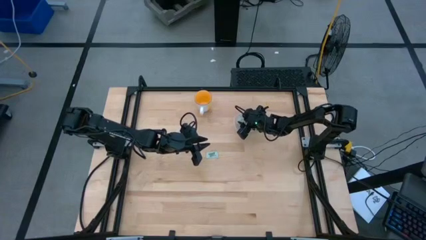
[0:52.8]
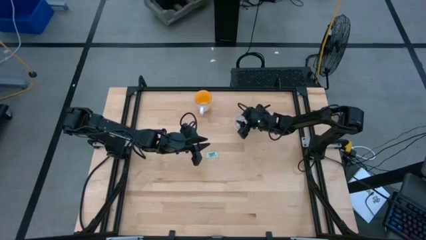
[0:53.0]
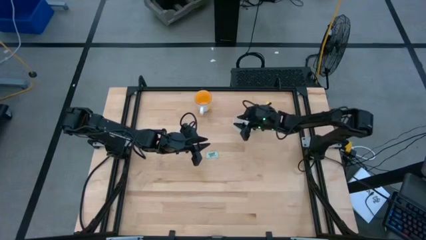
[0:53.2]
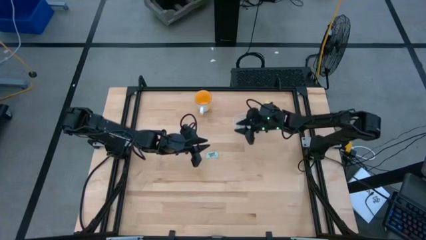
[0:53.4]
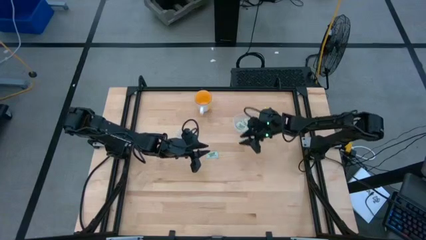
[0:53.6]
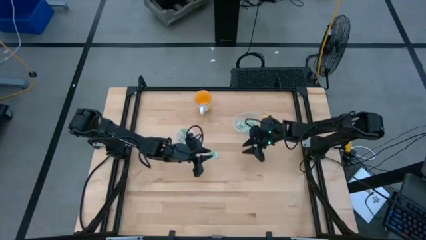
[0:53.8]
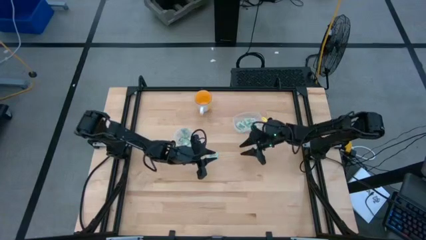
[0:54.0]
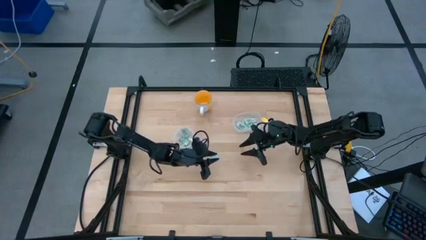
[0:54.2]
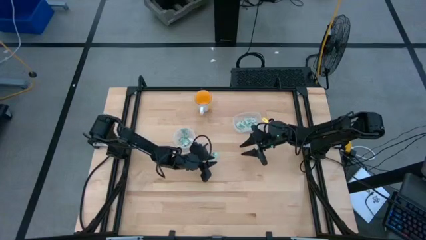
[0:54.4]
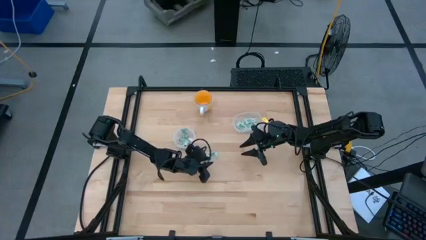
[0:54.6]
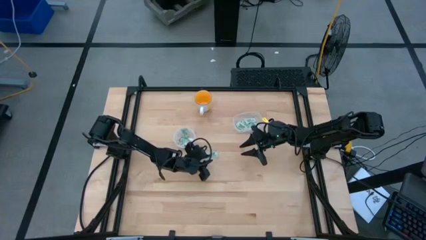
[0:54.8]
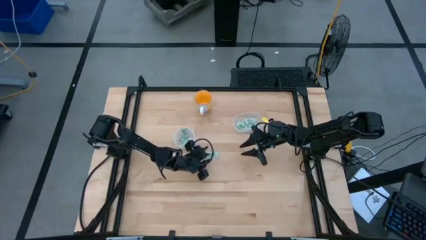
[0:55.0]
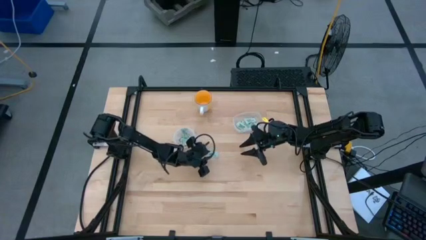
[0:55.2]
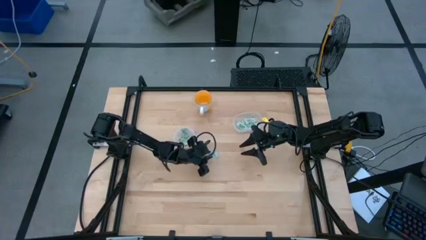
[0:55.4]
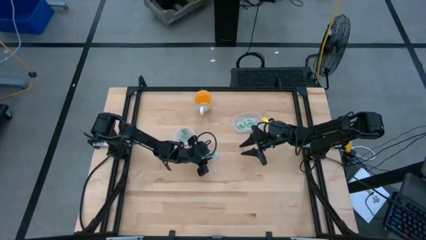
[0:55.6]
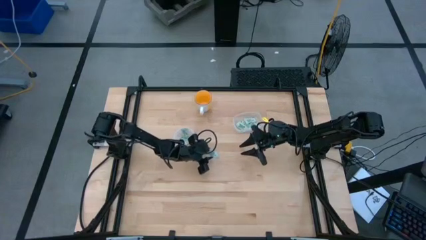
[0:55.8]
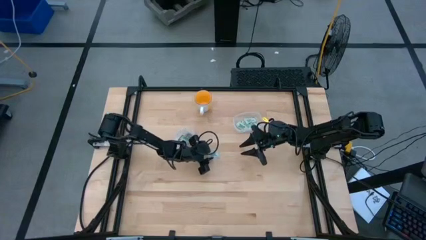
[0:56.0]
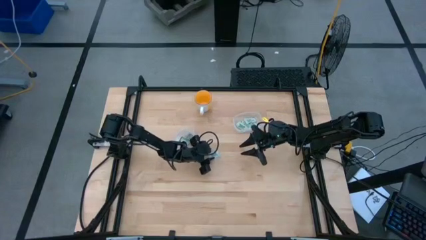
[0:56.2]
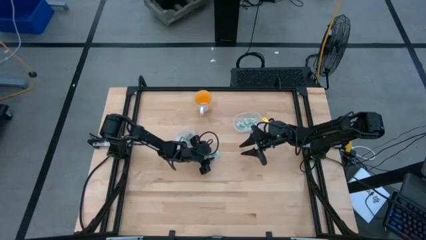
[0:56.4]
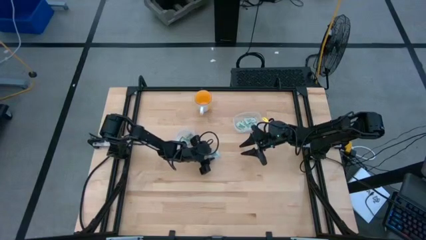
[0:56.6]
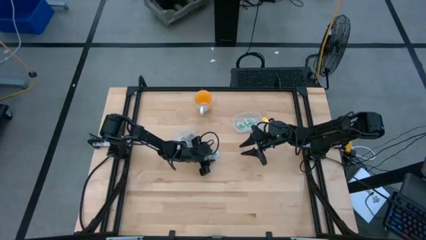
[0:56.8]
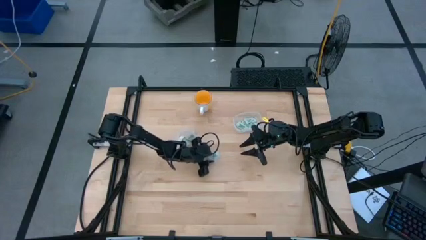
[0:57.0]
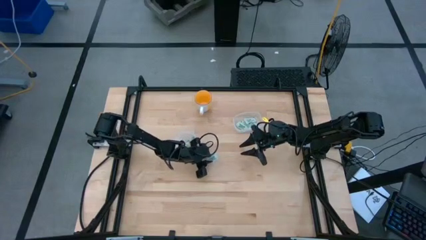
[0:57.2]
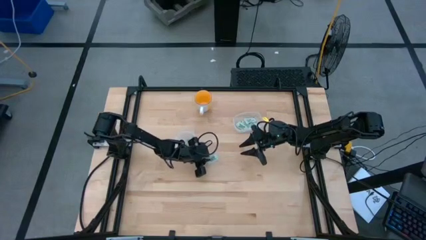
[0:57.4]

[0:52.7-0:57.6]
Task: Pick and place Stevia / Truvia into bins
Put the white stevia packet into the left transparent container

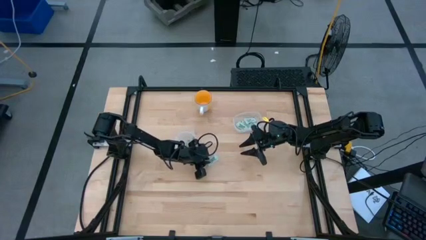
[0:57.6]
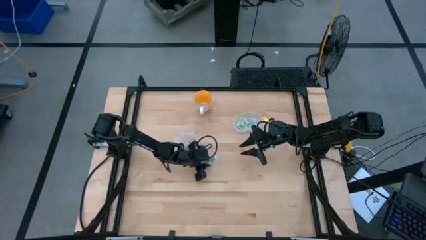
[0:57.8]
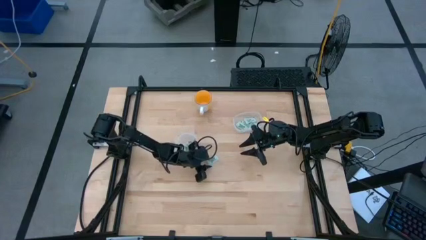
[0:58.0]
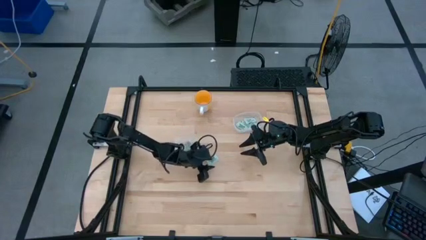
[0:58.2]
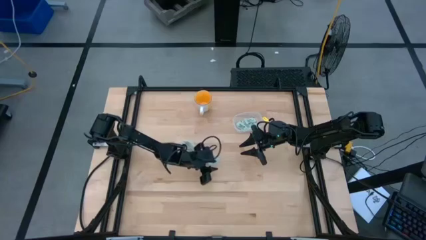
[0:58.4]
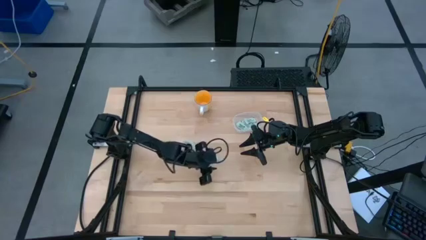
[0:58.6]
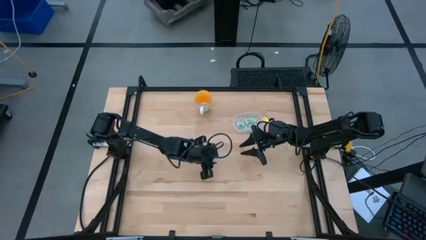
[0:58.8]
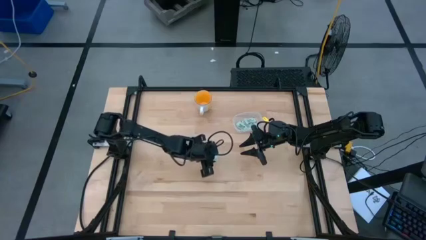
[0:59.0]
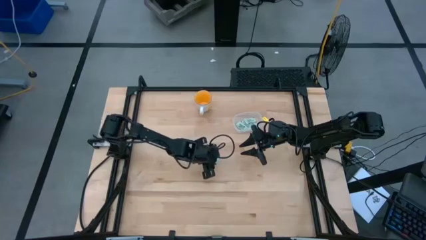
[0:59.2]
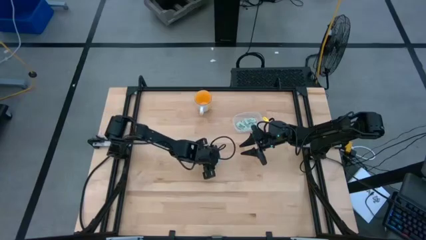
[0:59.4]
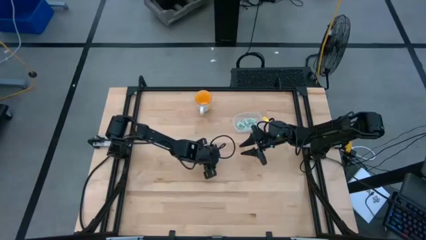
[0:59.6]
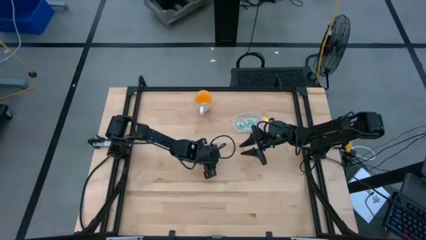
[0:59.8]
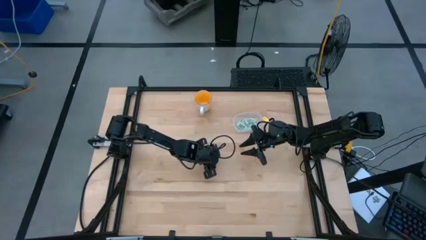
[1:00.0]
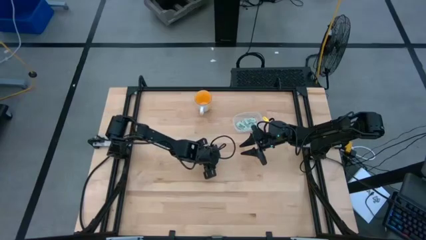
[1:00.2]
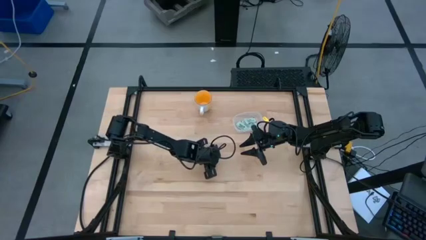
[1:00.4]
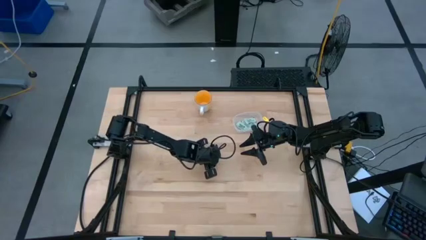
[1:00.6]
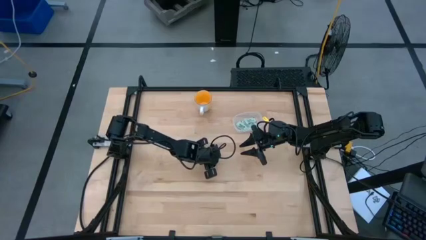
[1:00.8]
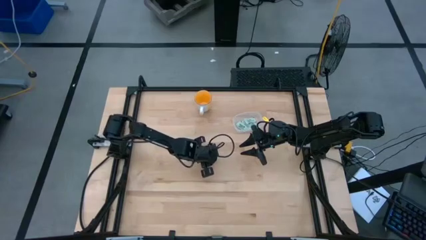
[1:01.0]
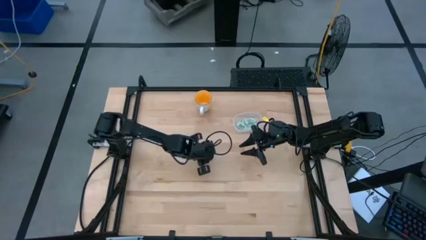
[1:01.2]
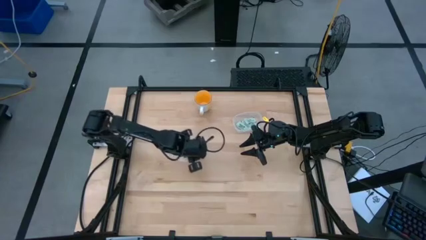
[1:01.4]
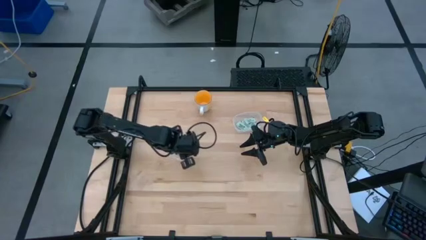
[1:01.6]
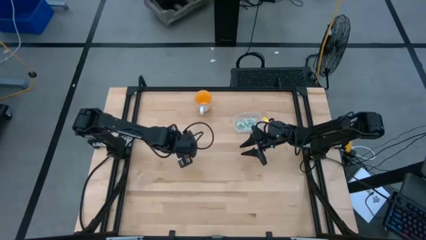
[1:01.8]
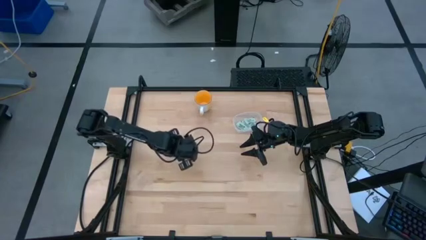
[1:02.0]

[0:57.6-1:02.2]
Put the white stevia packet into the left transparent container

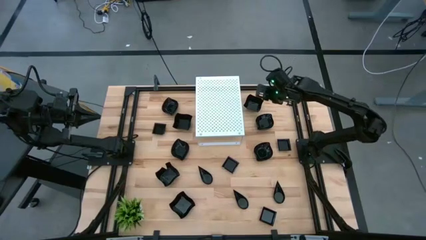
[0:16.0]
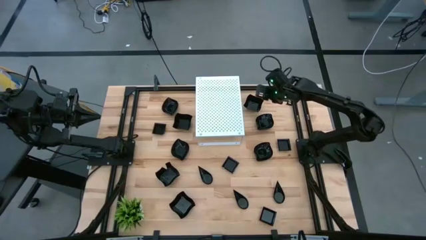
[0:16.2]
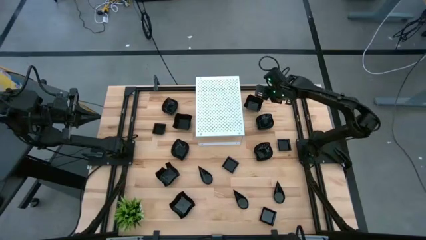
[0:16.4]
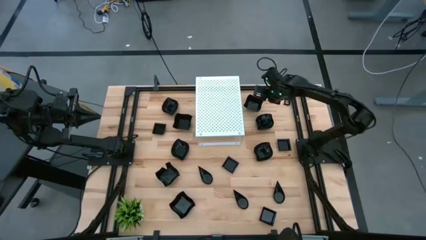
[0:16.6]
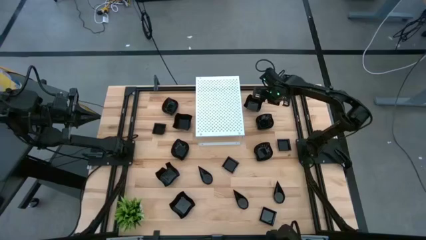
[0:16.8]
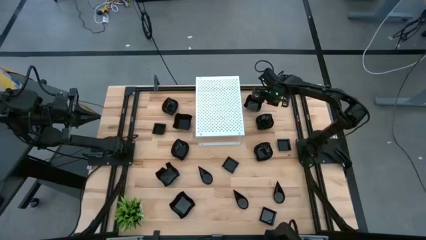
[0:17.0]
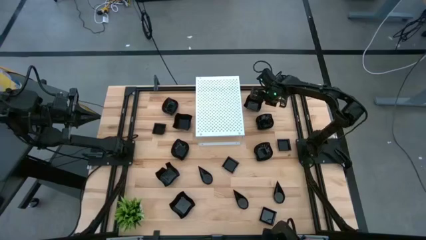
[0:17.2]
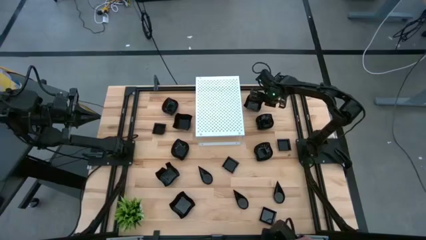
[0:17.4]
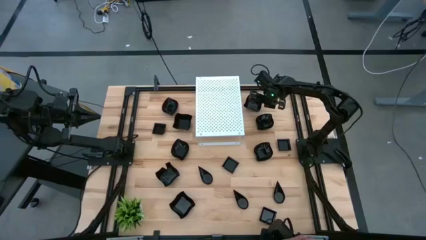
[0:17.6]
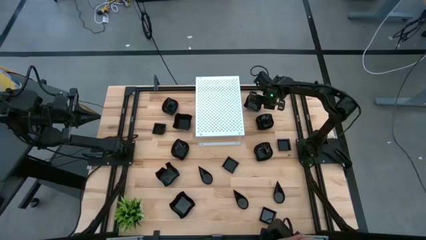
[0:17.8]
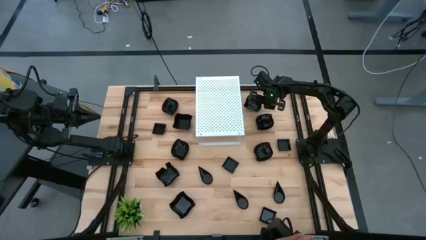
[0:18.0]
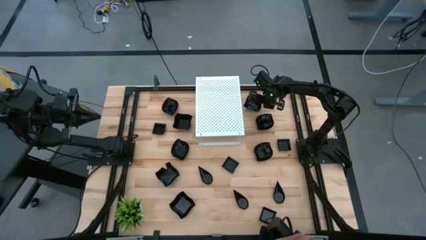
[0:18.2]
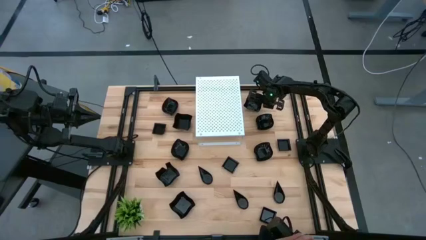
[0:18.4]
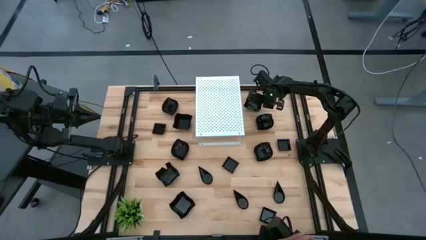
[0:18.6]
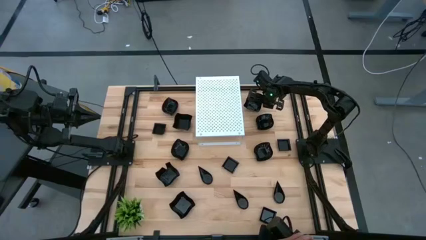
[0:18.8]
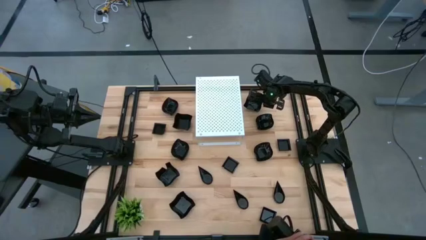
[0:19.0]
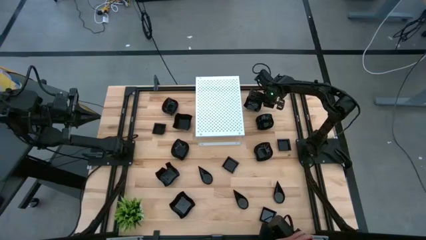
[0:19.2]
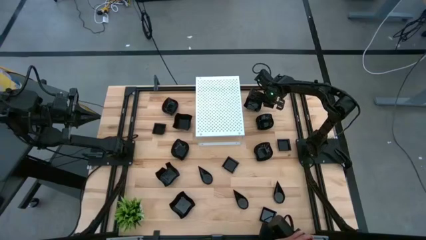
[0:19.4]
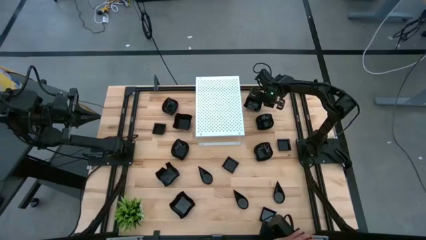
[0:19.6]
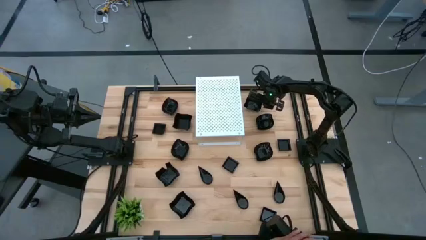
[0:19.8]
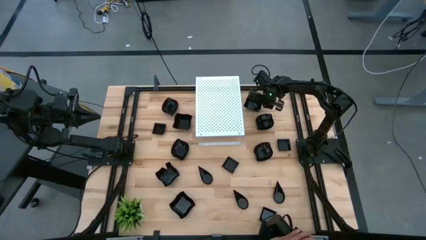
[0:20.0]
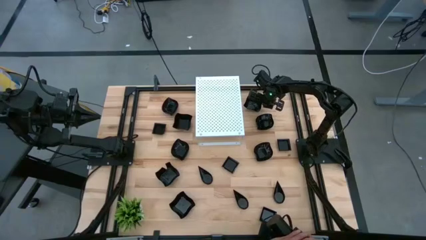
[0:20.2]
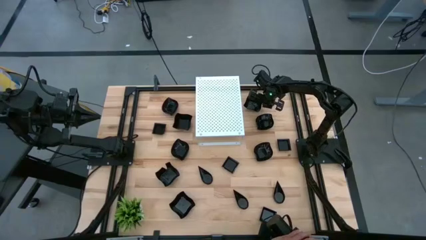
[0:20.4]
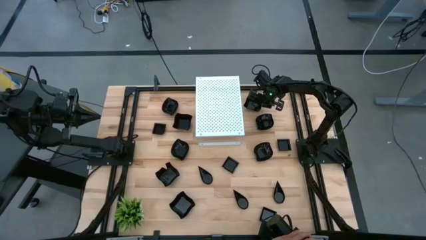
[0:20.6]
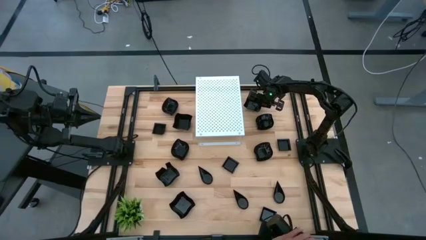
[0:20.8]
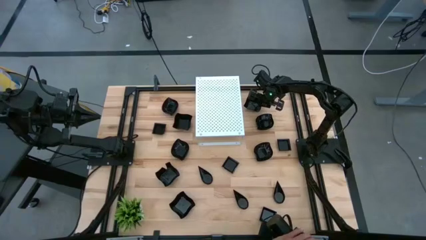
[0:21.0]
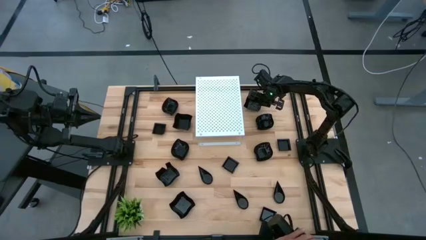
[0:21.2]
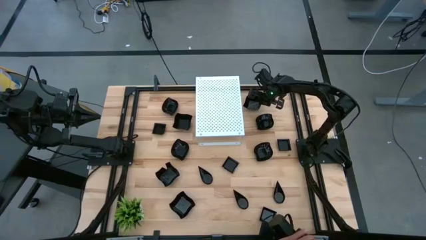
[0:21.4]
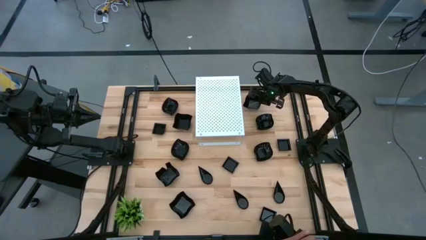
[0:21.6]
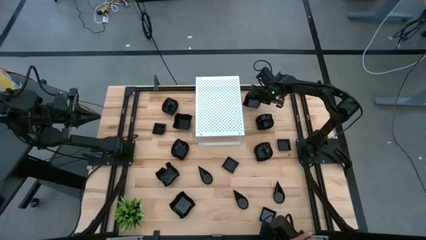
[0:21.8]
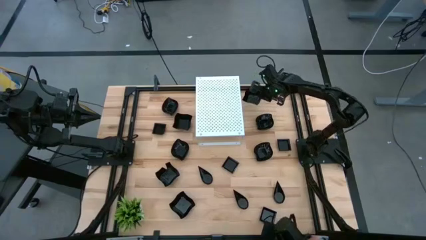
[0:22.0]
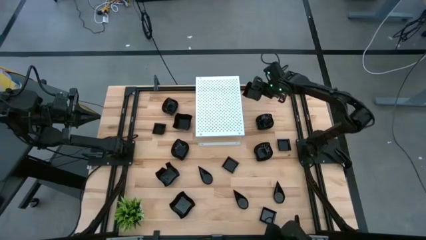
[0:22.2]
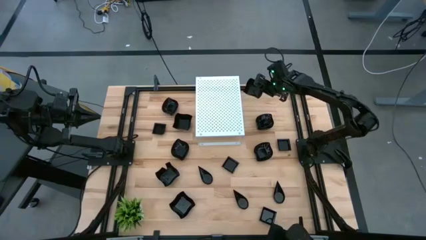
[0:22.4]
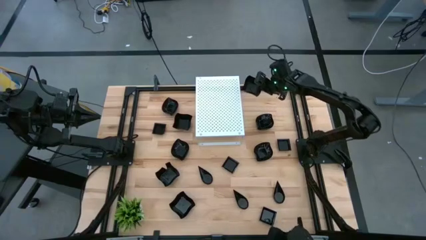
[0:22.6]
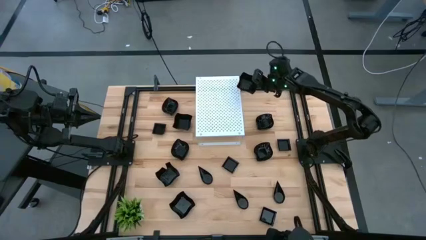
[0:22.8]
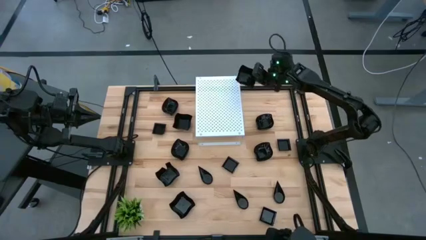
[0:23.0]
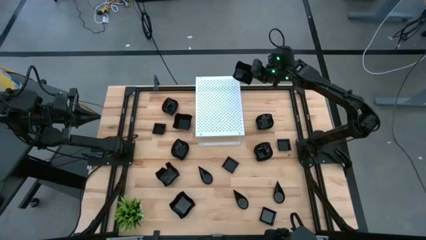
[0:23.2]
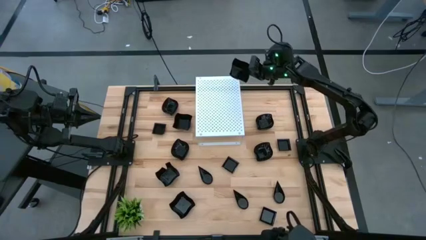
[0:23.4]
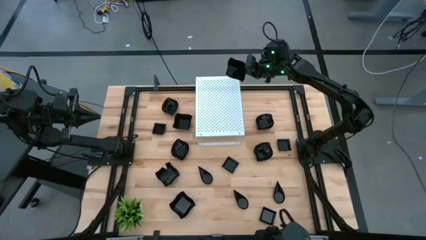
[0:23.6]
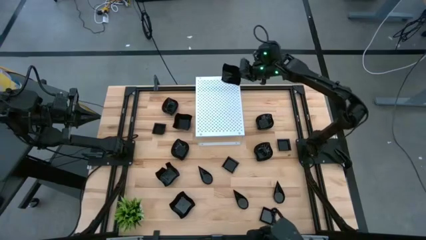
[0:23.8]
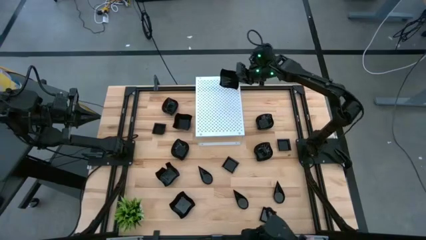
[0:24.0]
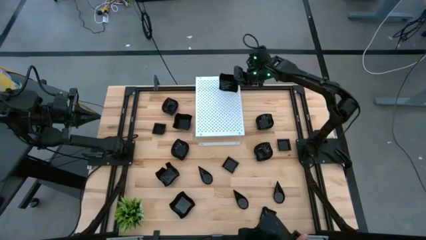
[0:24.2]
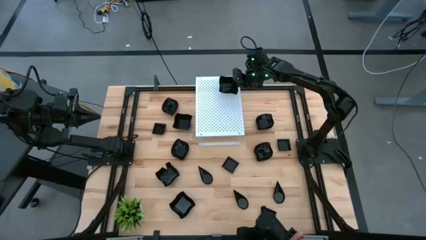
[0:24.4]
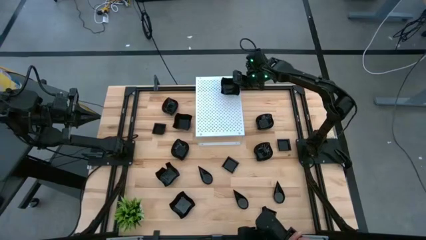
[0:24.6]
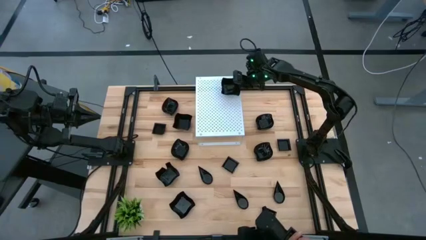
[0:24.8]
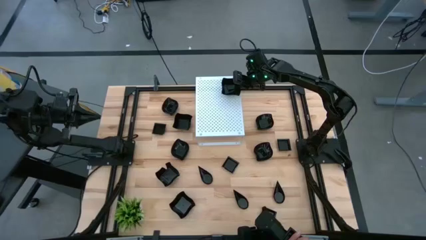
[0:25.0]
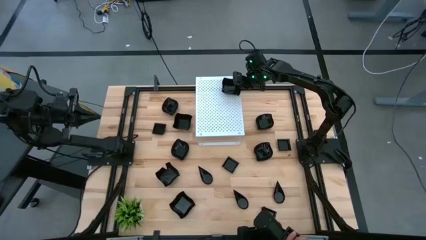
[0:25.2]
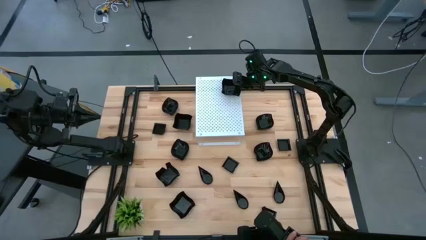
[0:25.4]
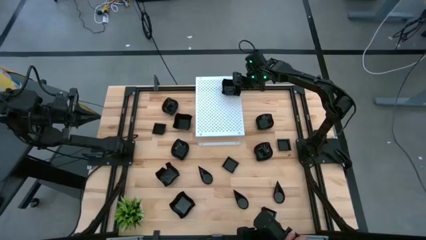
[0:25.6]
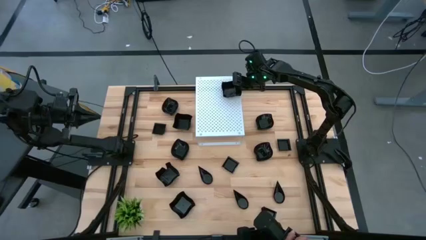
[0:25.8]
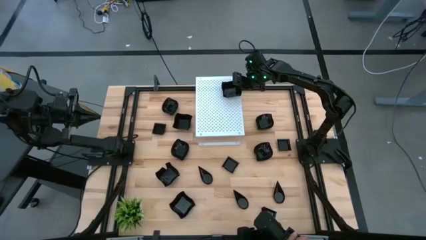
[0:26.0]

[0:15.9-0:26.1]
Task: Pick & Place Mini shaped plates
Put the distorted square plate on the shelf
